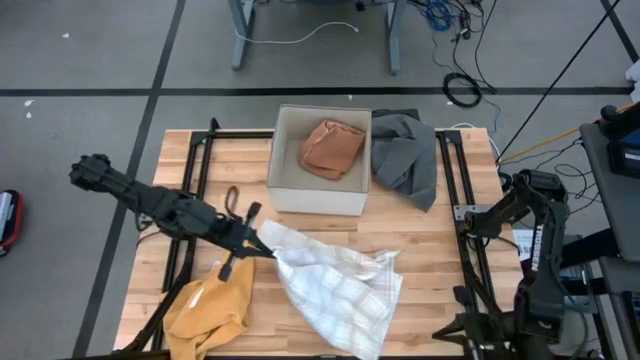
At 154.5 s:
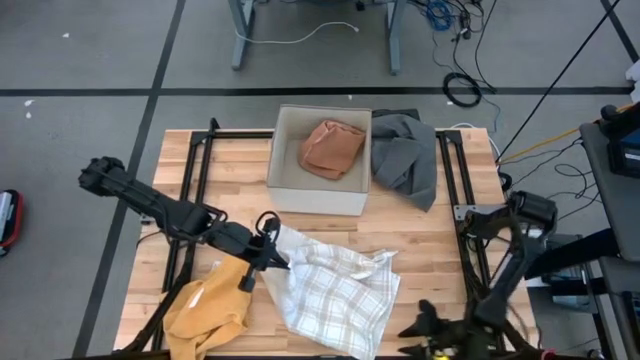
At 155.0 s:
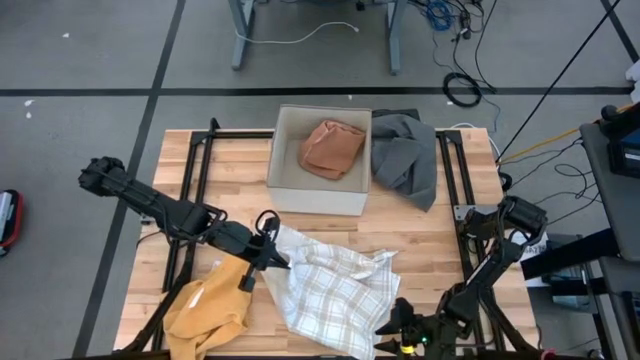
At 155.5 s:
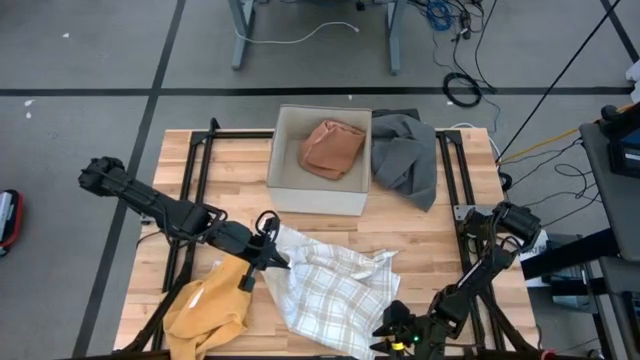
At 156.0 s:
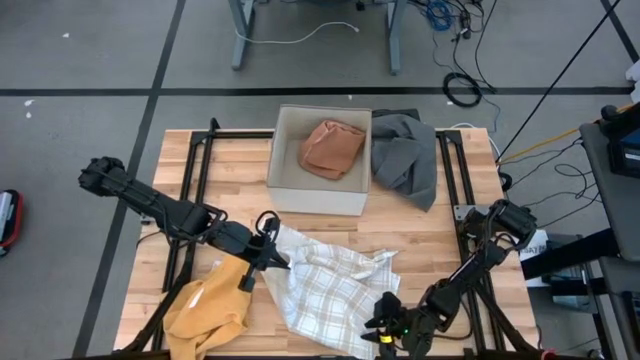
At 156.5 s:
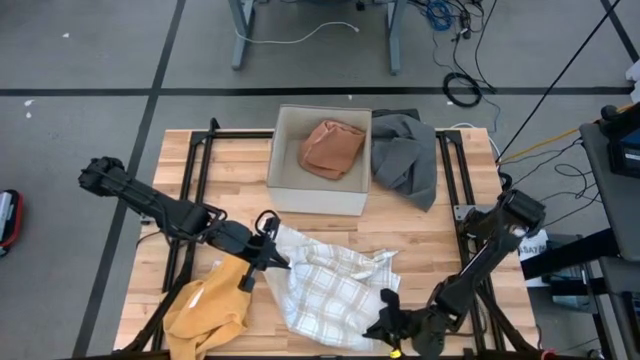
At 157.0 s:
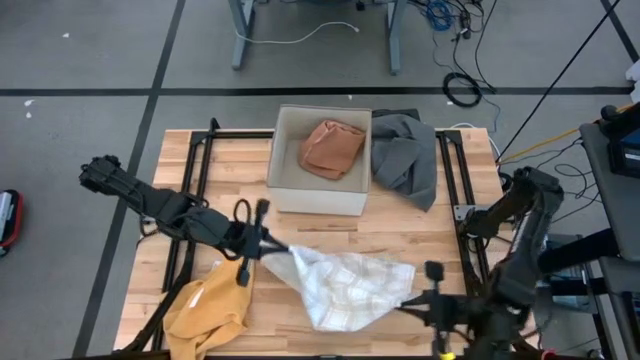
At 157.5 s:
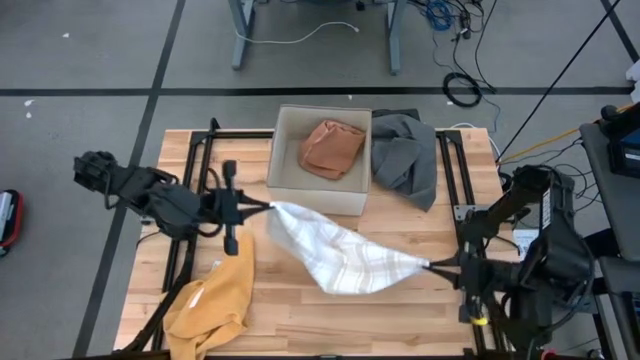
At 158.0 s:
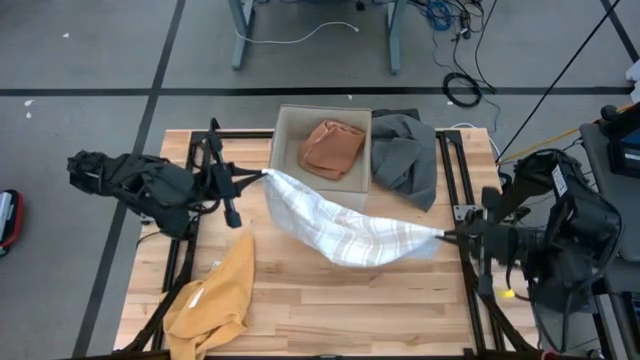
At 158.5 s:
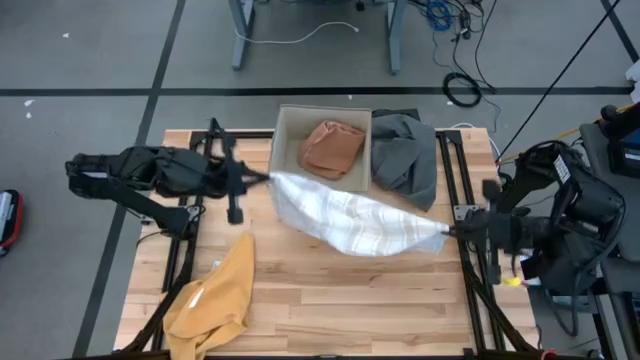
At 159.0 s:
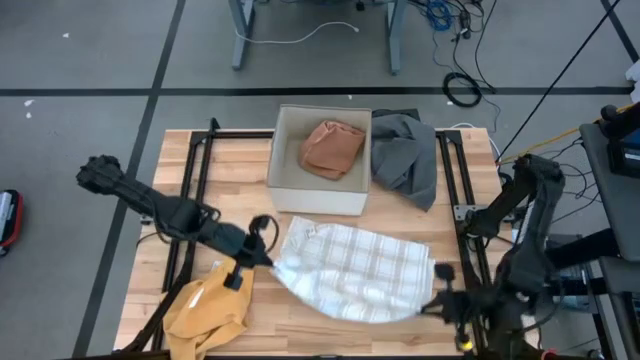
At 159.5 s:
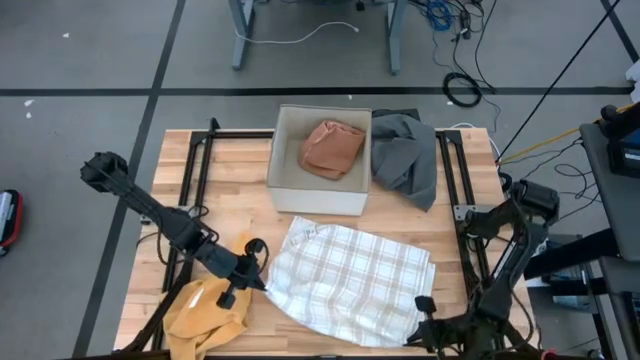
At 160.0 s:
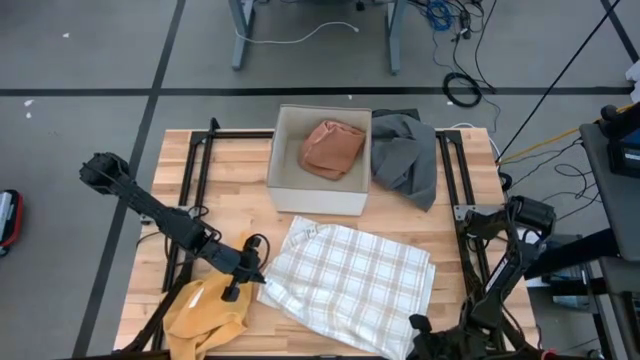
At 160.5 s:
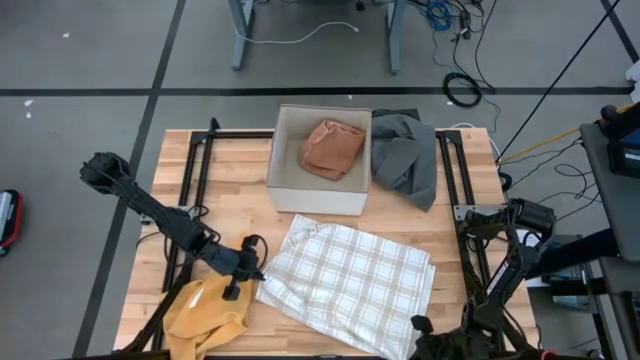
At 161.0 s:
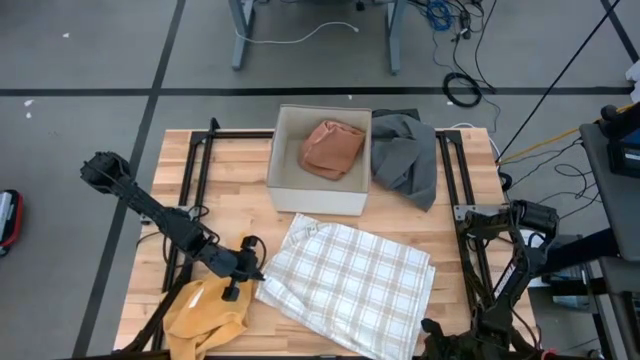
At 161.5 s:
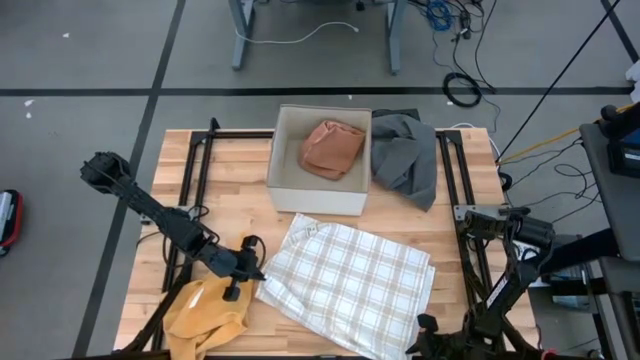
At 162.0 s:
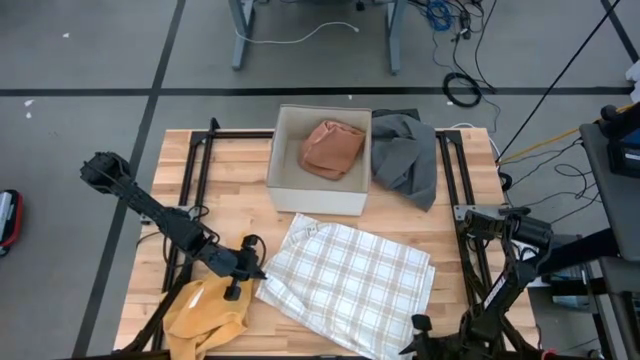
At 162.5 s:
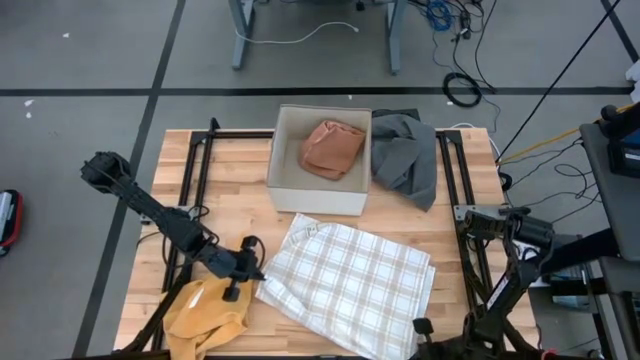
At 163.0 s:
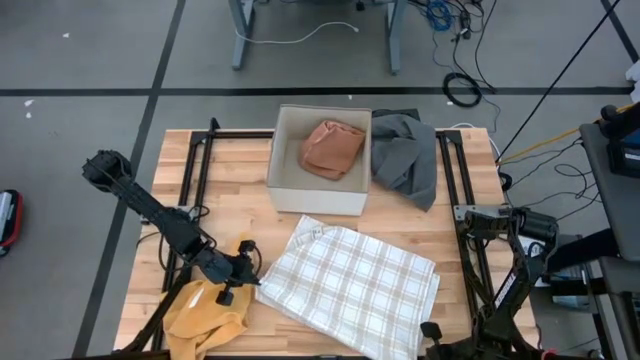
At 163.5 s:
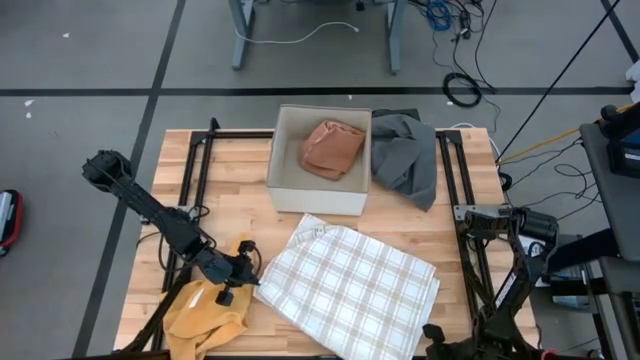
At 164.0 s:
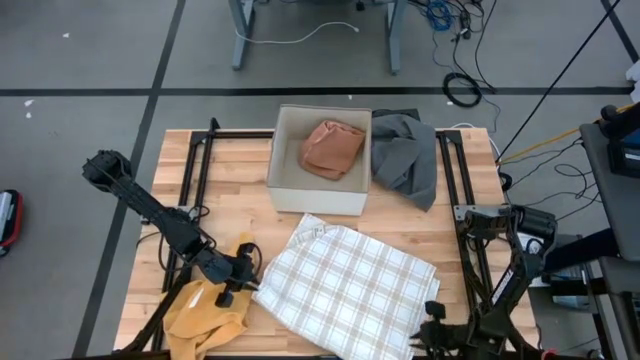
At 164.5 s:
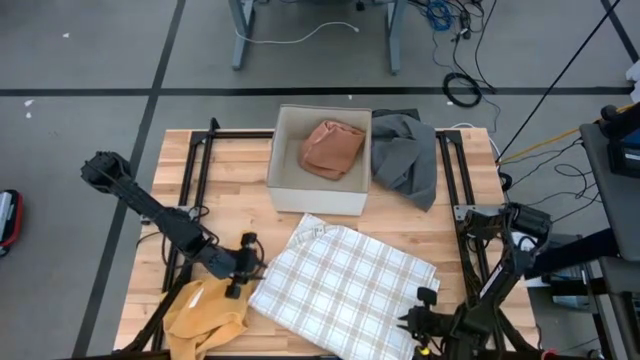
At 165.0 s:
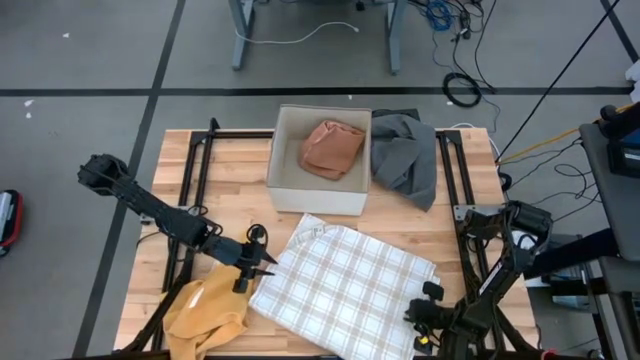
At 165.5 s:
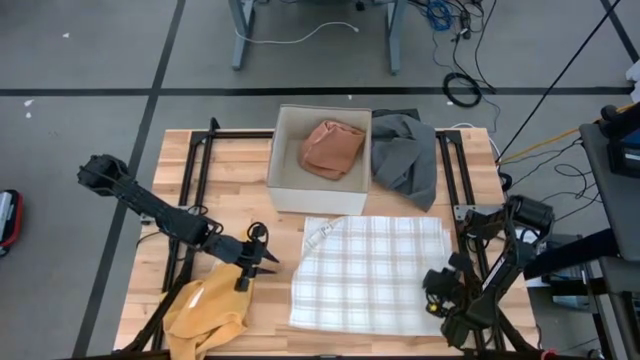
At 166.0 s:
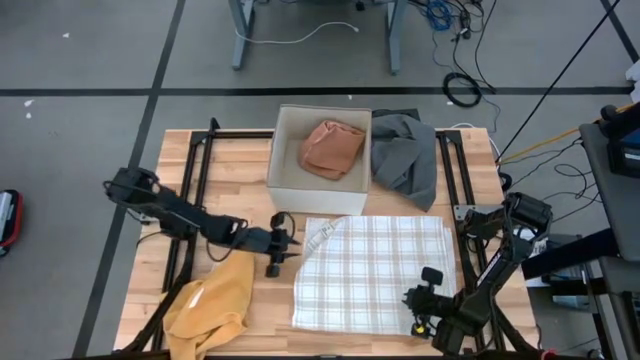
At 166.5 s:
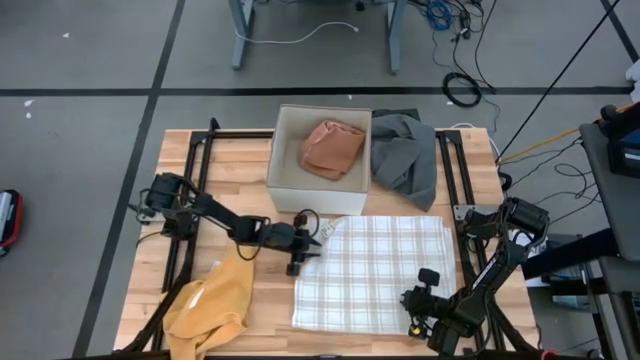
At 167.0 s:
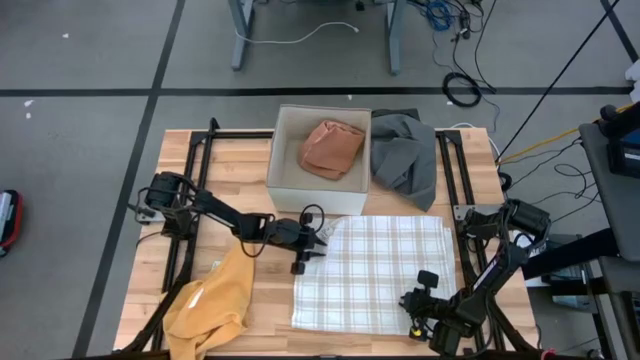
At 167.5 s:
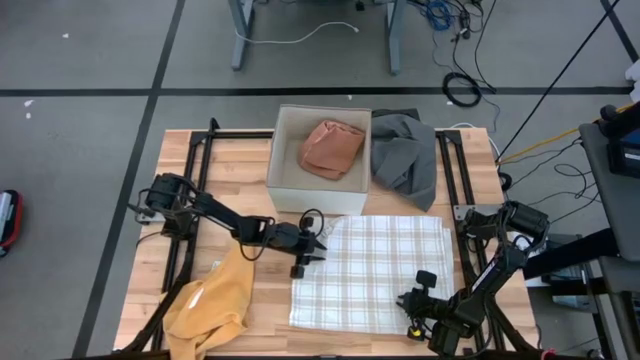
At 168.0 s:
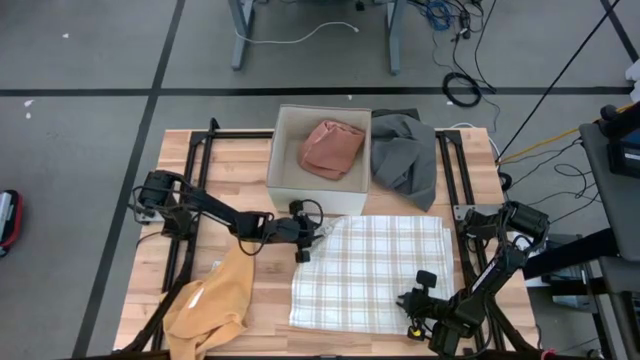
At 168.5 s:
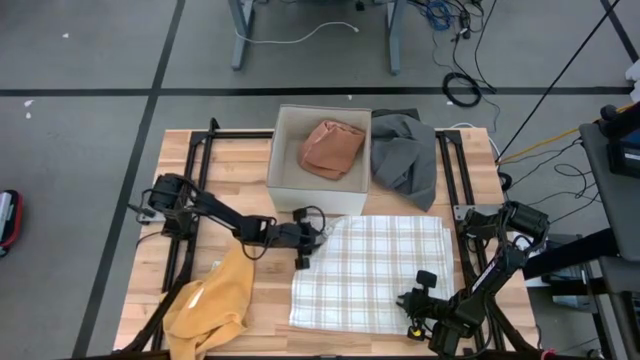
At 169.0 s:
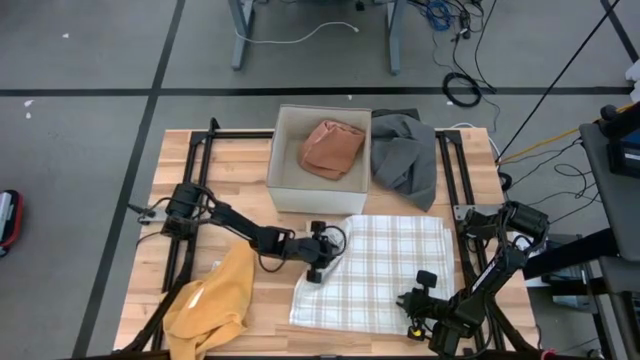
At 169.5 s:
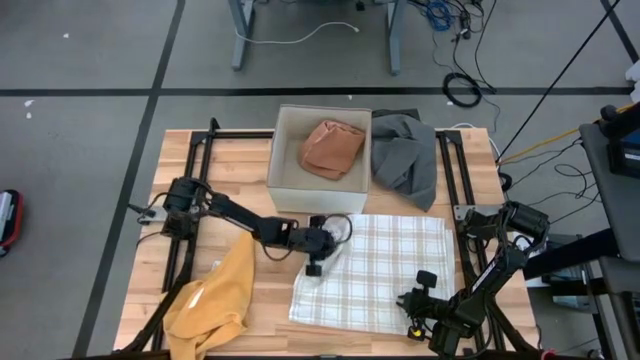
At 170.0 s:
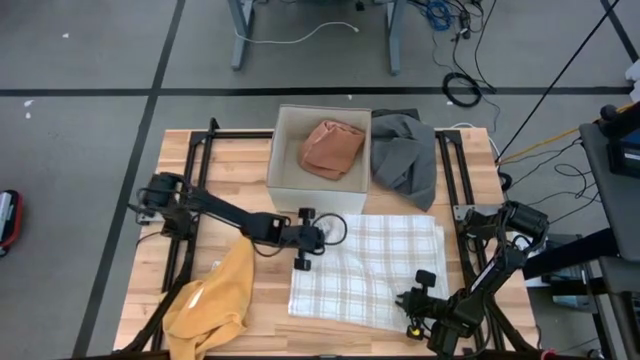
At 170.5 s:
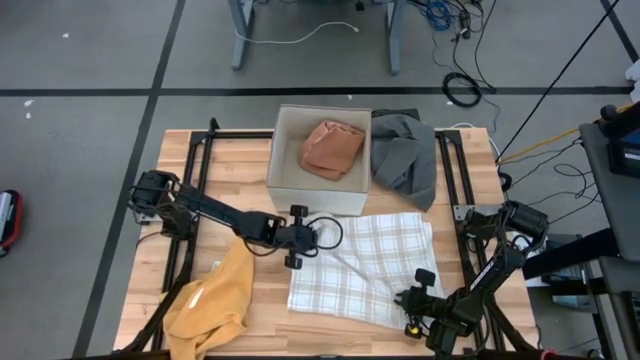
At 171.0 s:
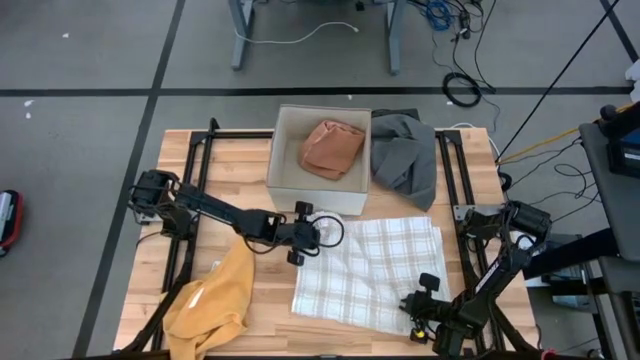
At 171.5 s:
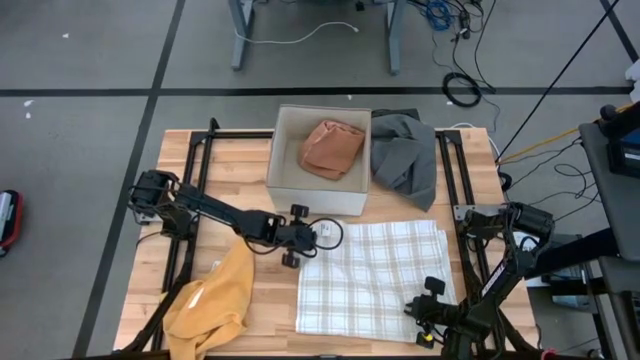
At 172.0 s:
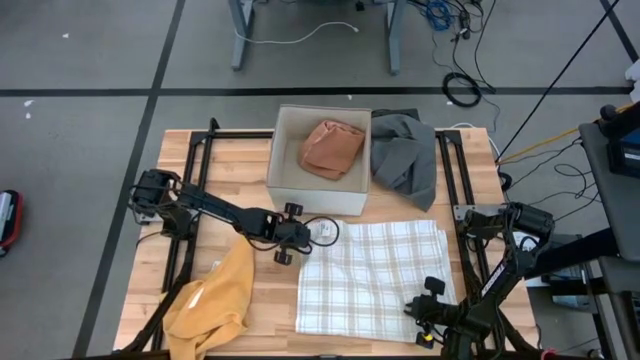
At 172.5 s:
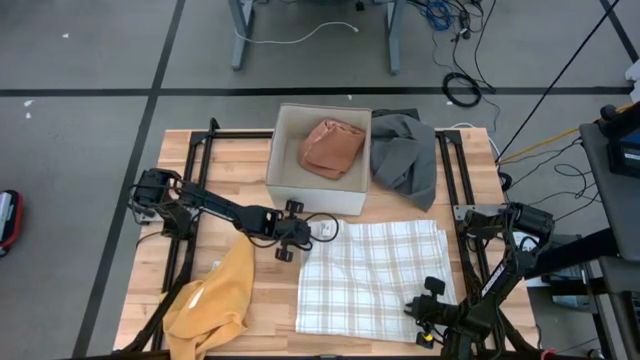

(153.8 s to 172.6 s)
Task: Fold towel
Fold the white towel

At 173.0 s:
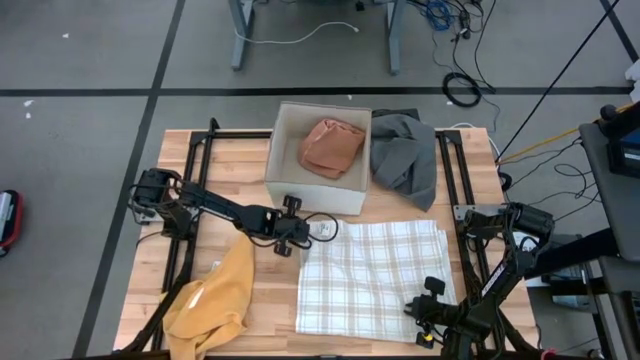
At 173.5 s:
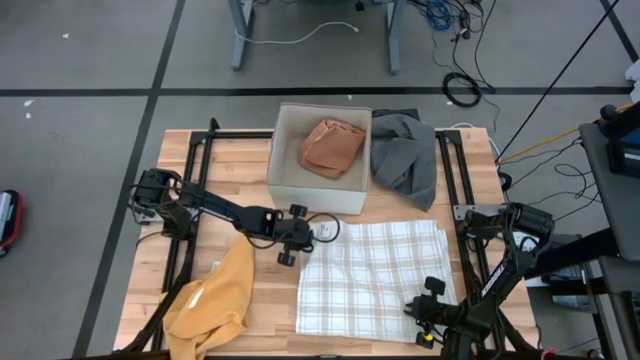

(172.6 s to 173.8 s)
Fold the white towel
